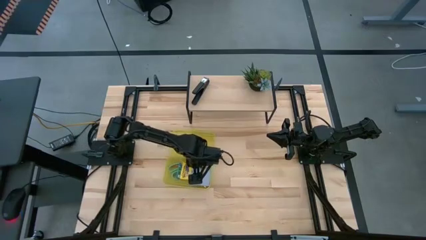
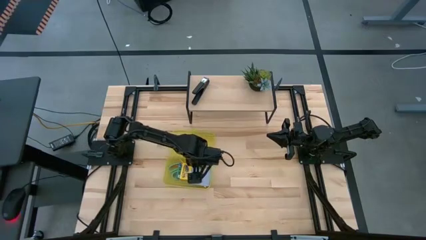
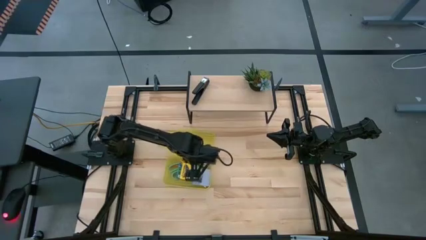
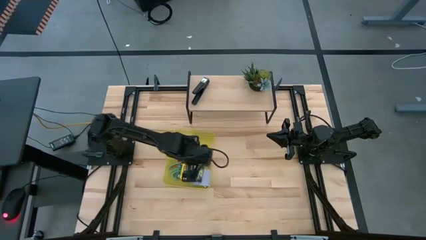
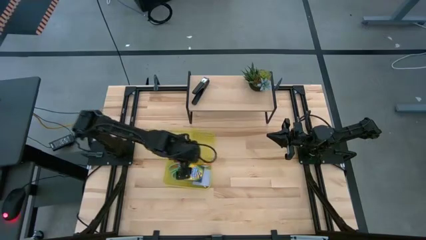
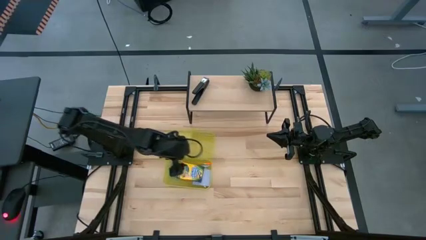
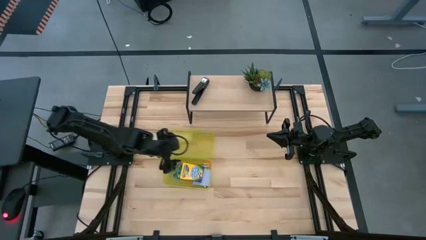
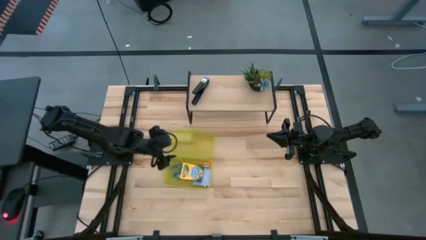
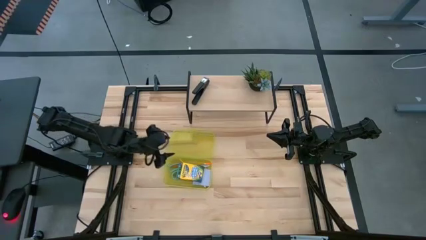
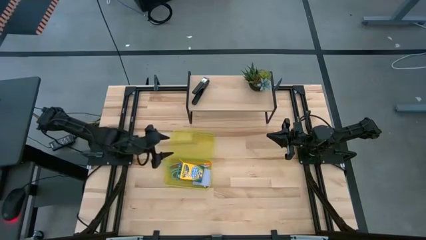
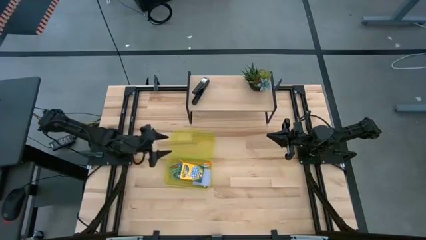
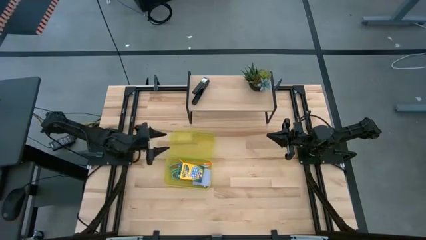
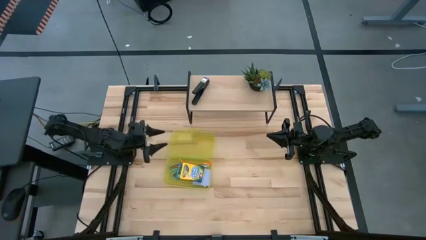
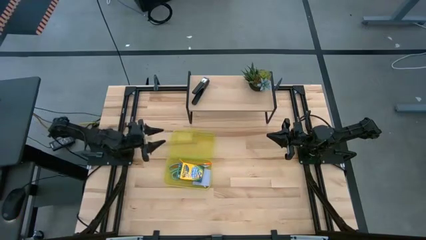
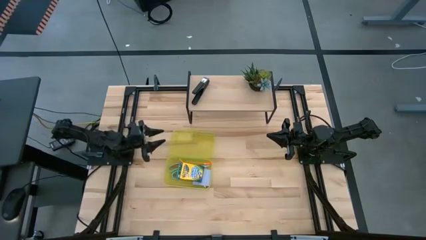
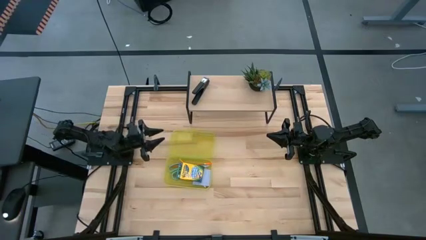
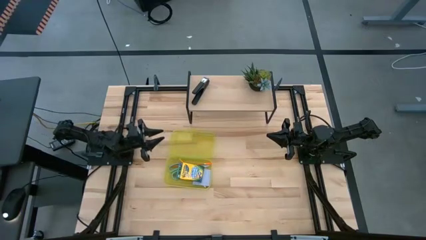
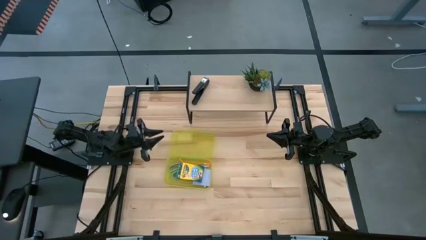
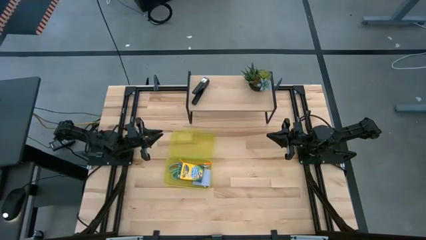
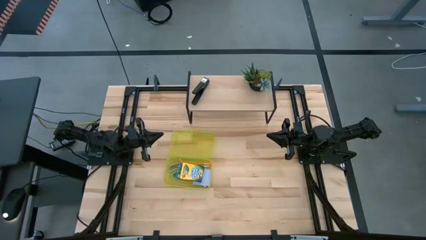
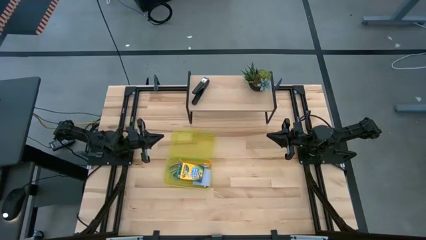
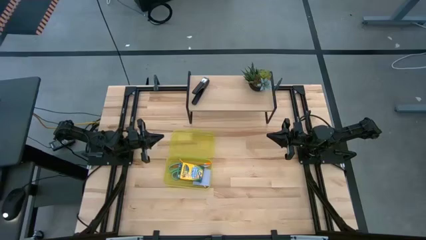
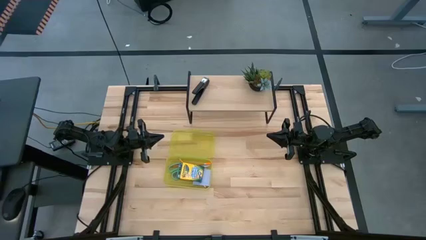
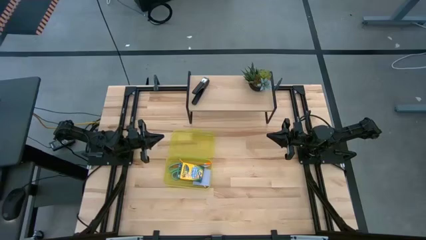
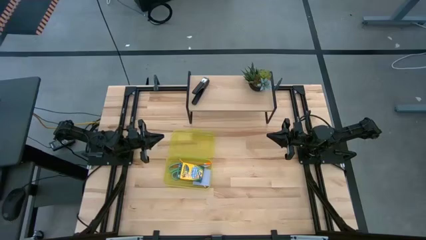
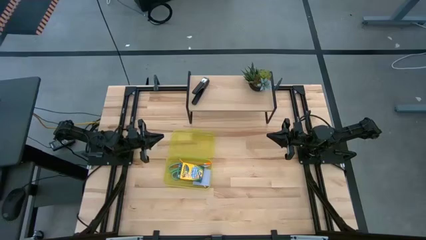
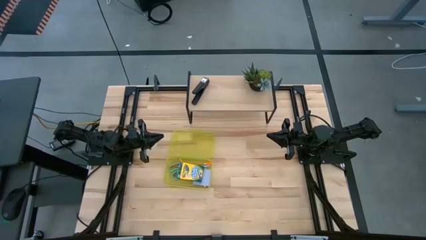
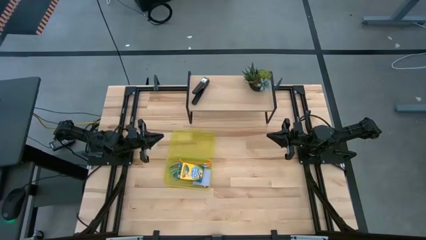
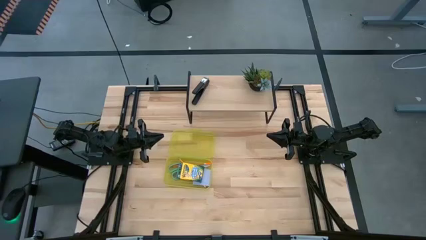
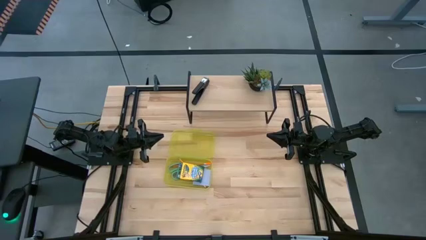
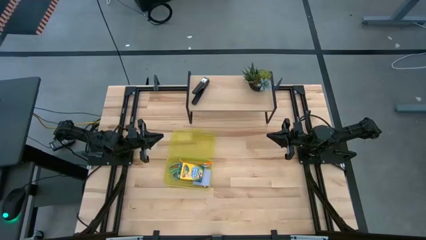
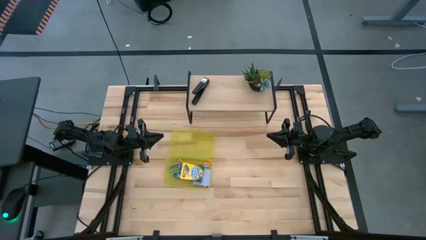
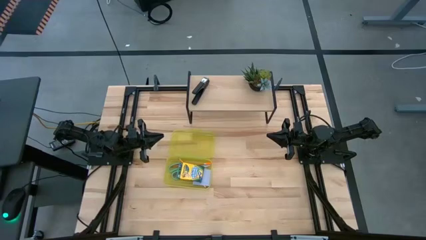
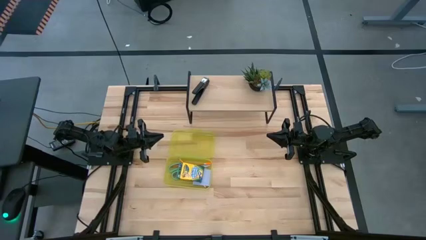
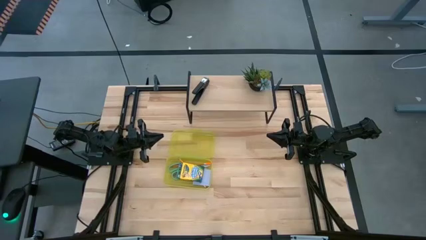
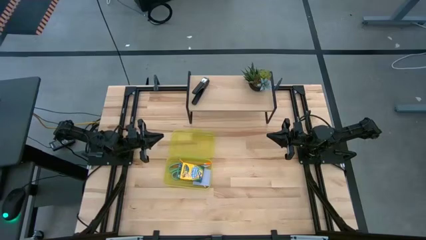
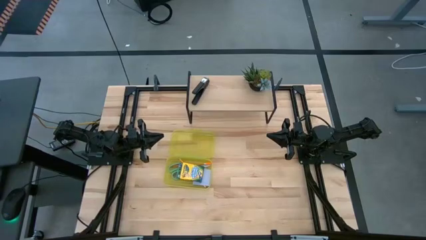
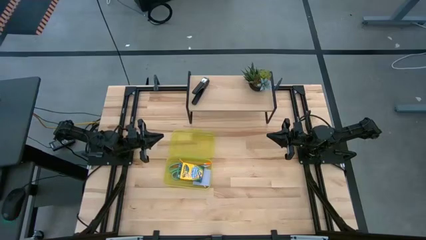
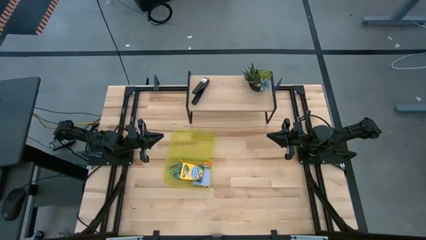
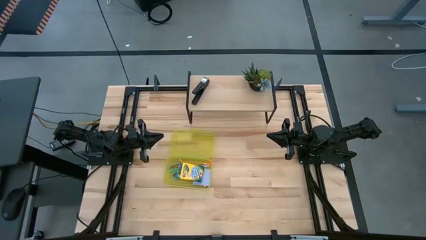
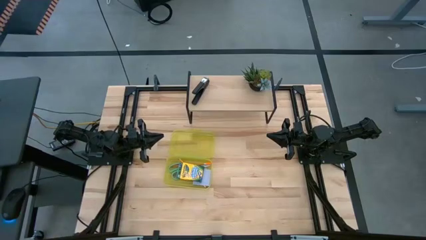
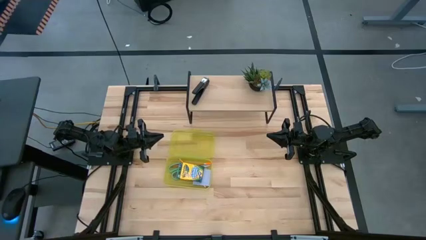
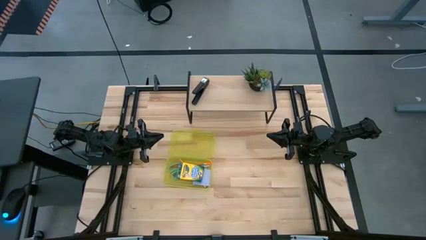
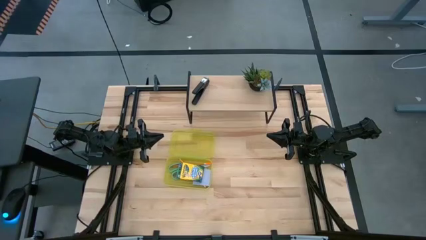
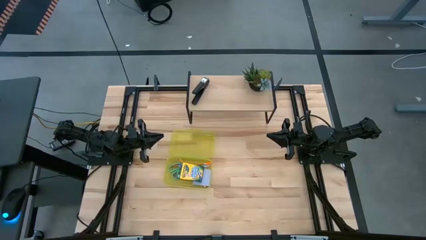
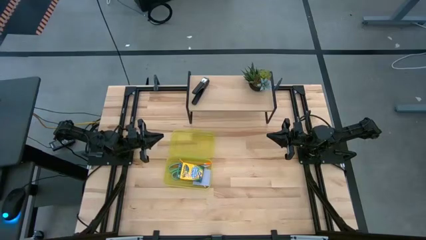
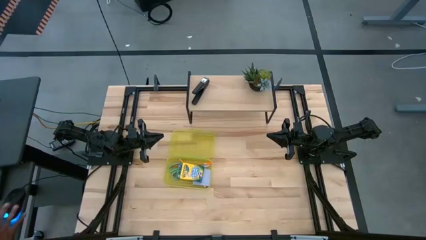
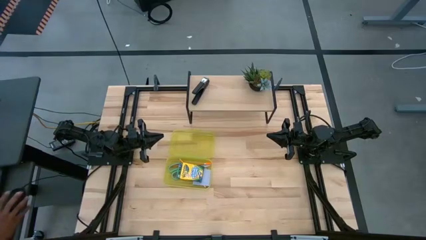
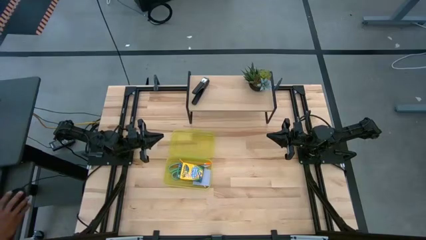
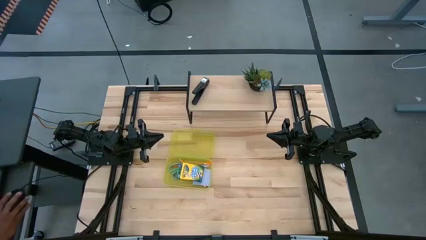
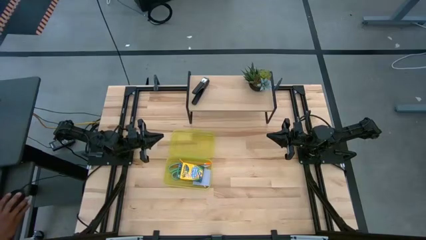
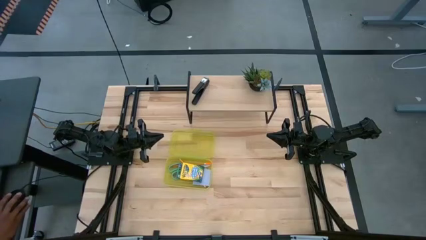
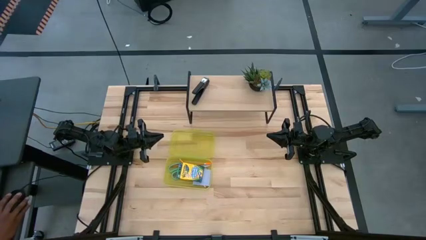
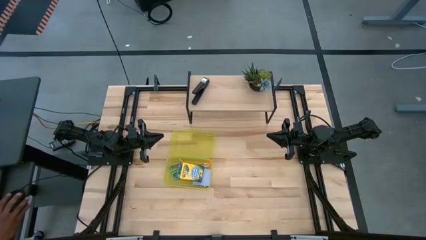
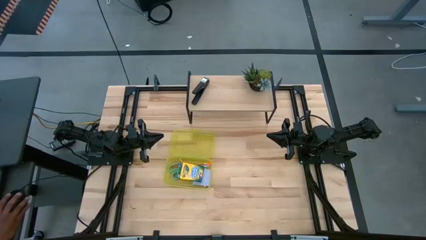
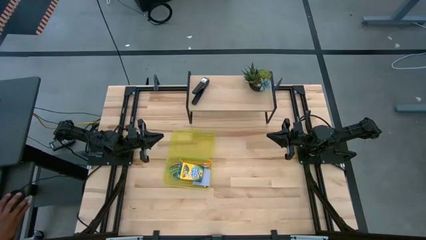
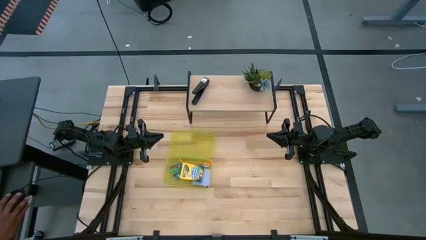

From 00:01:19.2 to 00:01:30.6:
Task: Pack school essentials
Return to Home Position

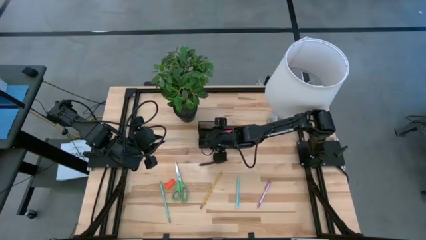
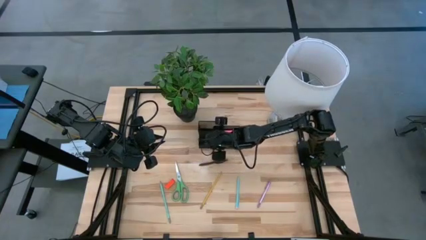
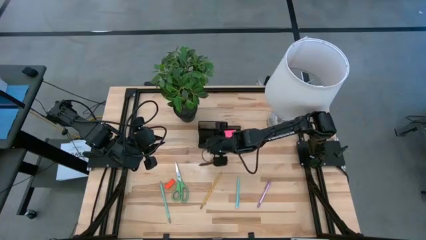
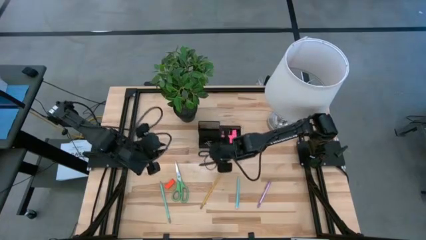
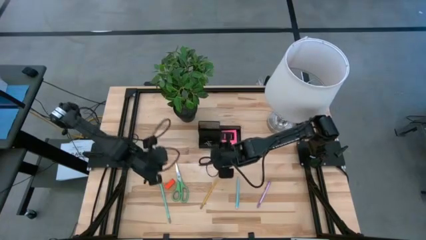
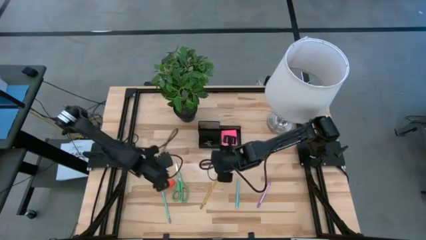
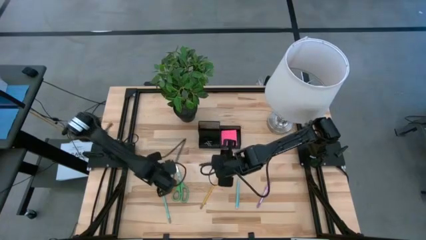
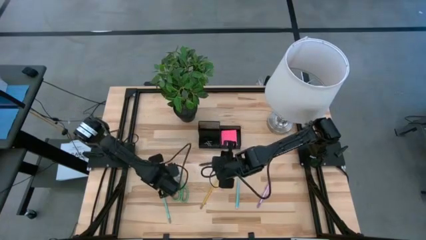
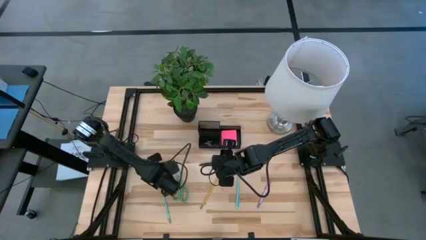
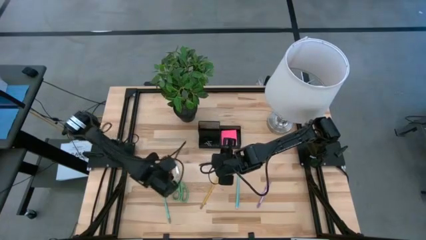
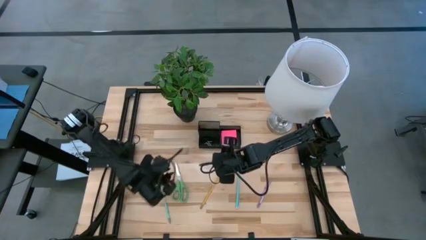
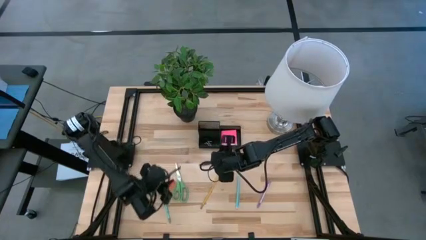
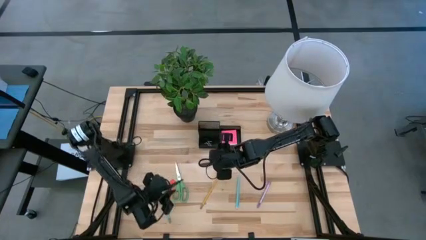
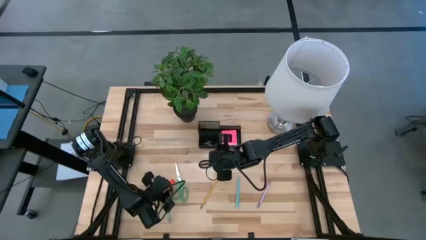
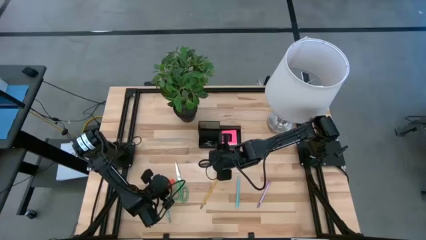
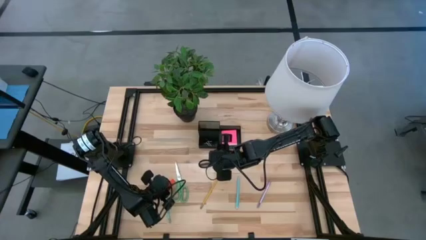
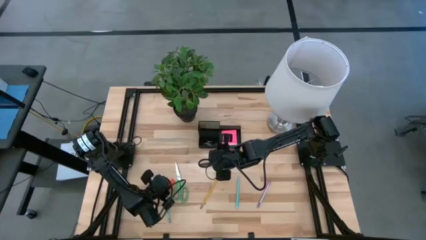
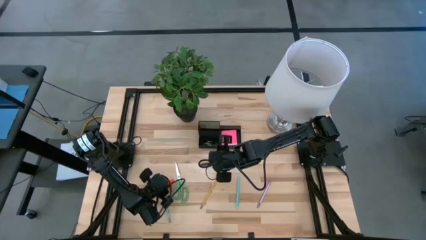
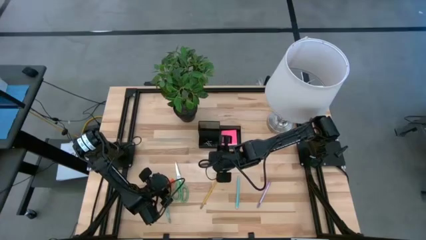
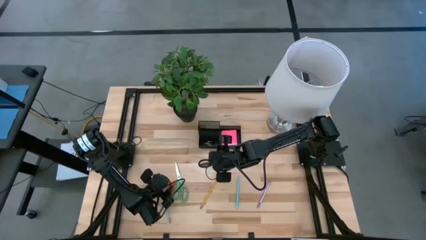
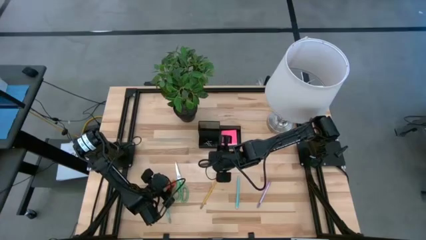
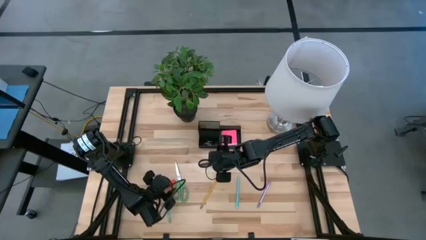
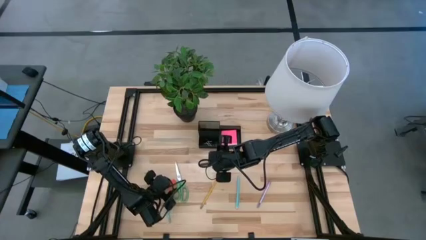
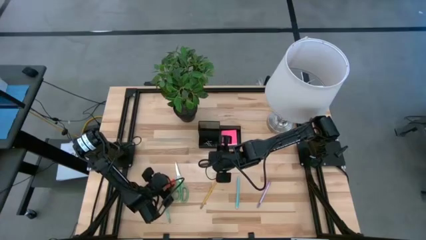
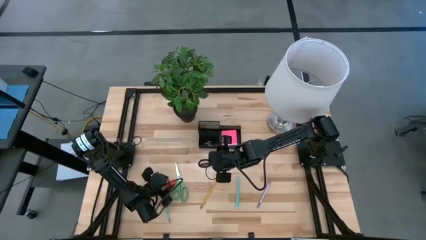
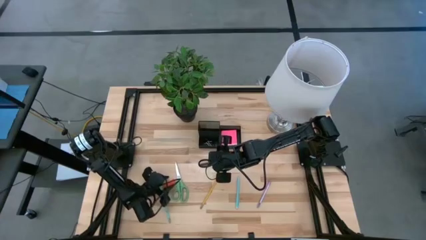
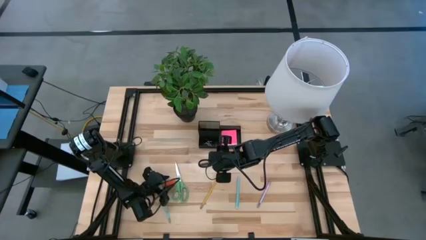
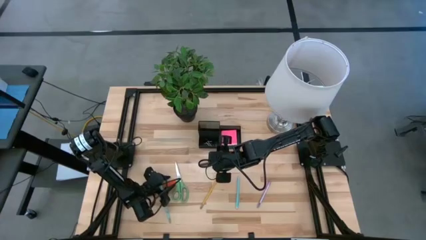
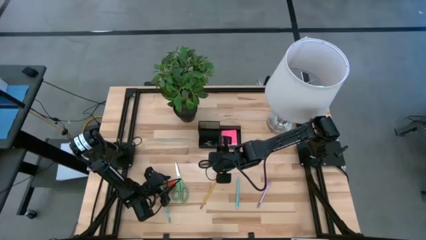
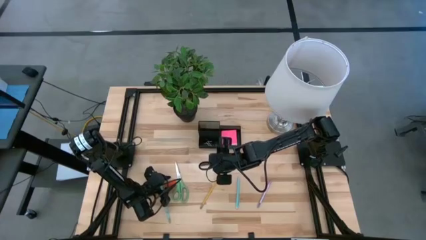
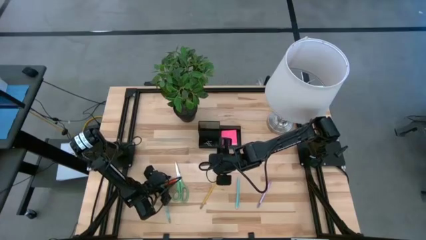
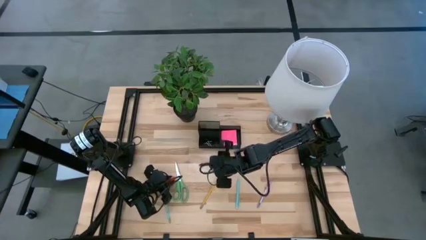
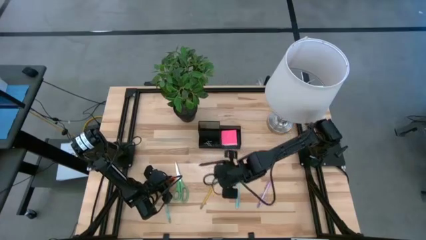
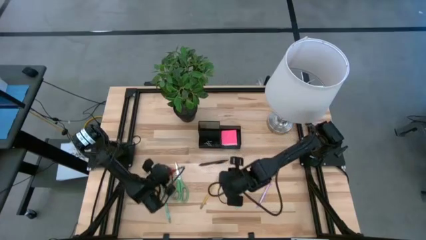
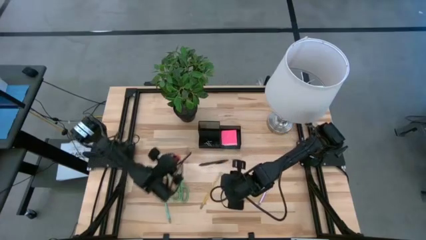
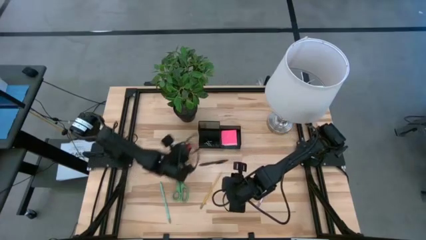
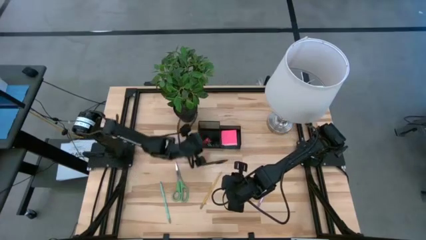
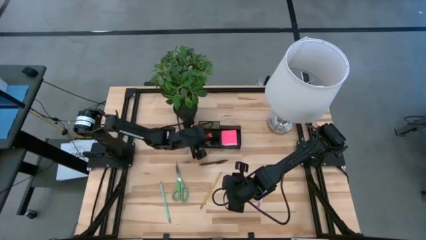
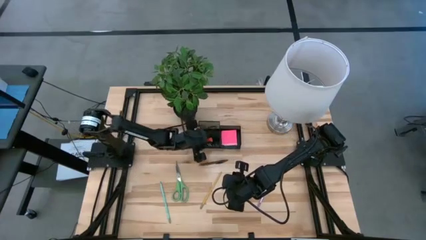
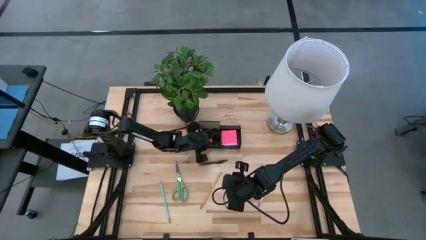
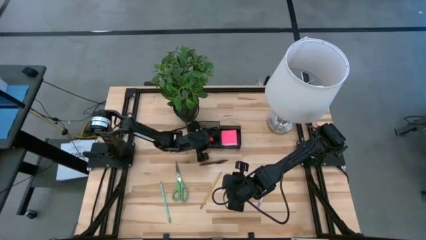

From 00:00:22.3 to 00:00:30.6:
Task: Pick and place office supplies into organizer
Put the orange eraser into the black desk organizer
